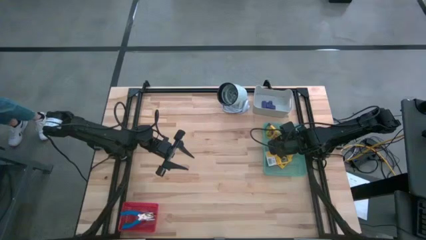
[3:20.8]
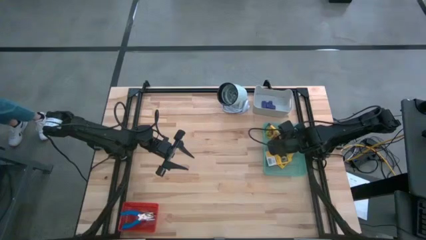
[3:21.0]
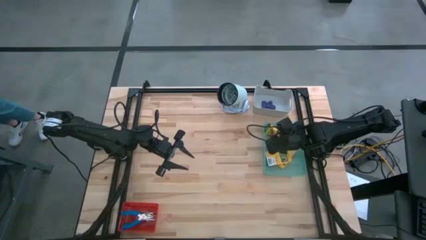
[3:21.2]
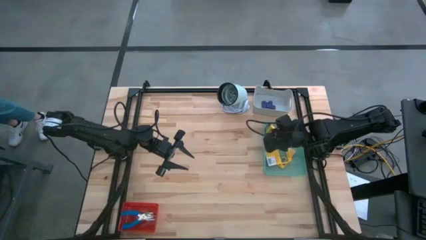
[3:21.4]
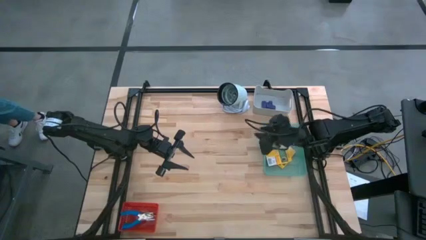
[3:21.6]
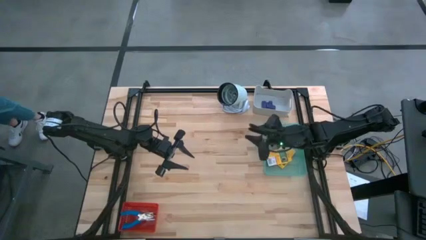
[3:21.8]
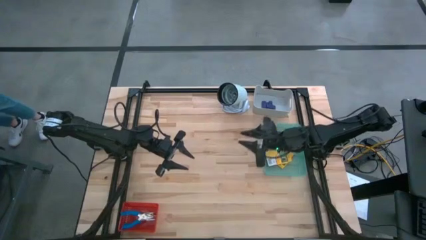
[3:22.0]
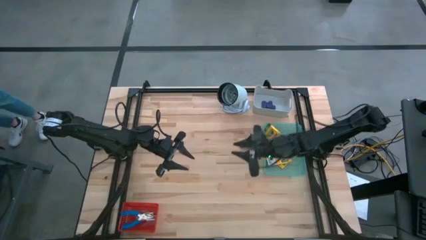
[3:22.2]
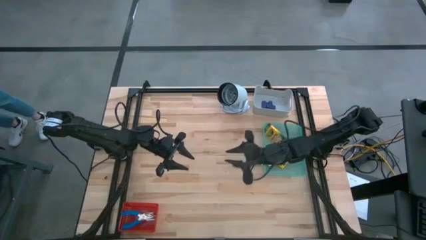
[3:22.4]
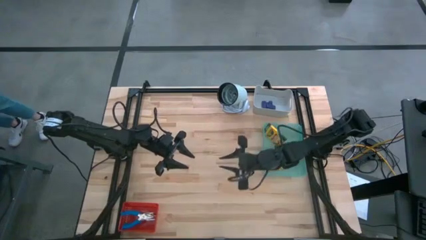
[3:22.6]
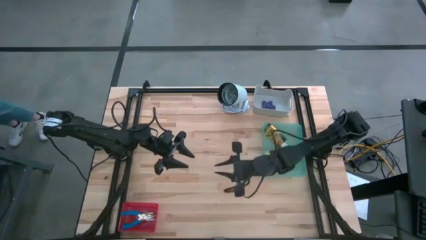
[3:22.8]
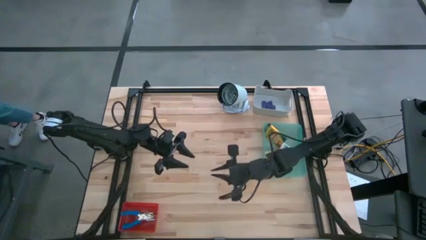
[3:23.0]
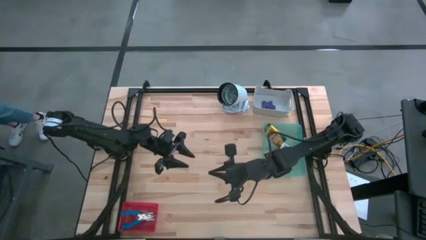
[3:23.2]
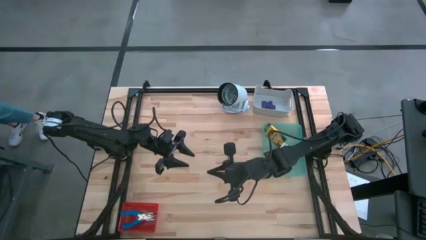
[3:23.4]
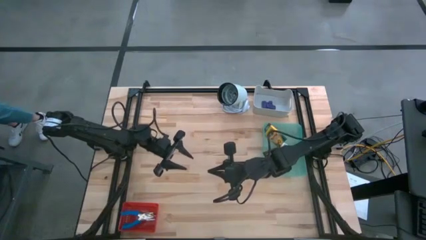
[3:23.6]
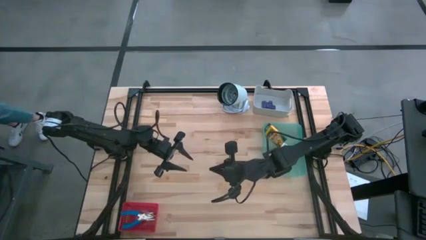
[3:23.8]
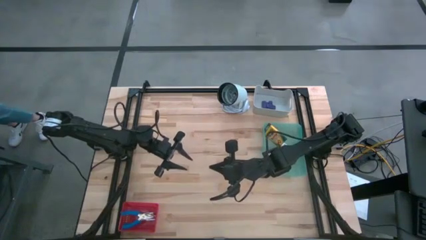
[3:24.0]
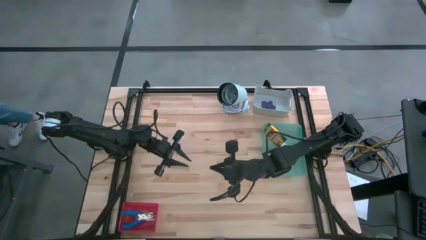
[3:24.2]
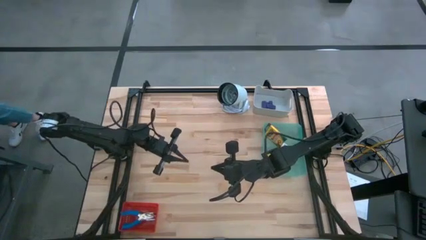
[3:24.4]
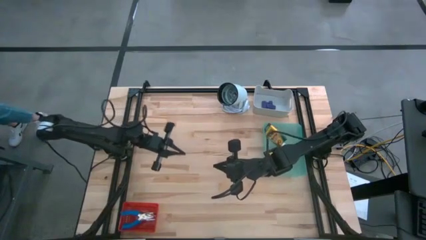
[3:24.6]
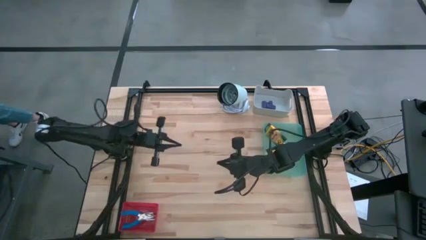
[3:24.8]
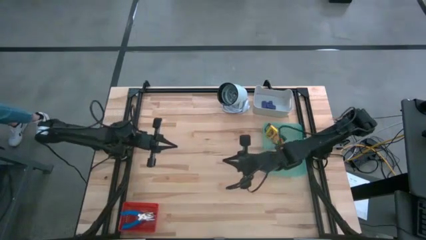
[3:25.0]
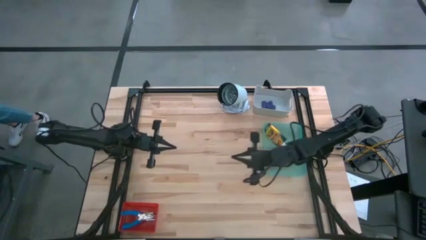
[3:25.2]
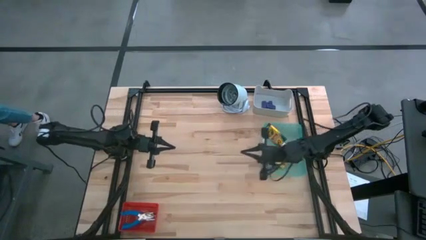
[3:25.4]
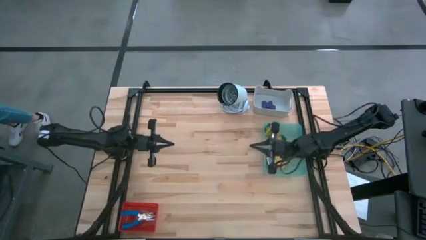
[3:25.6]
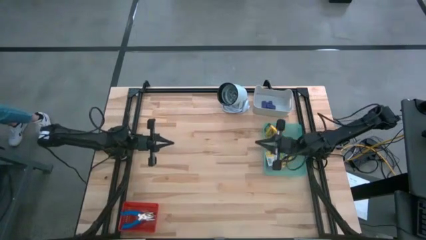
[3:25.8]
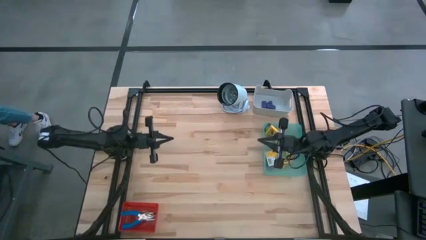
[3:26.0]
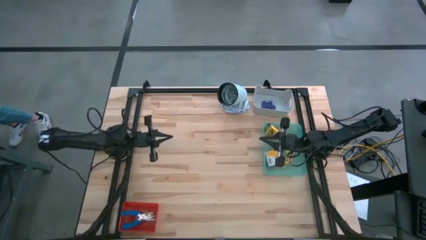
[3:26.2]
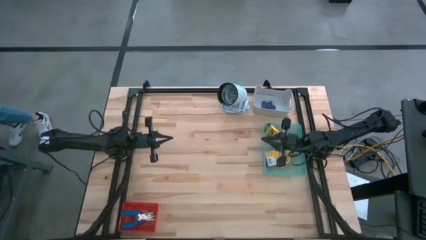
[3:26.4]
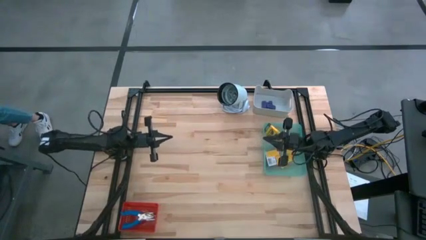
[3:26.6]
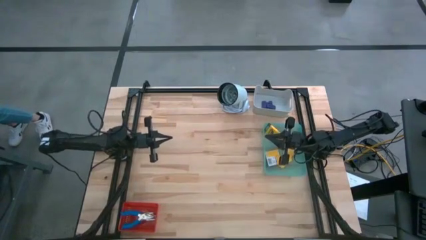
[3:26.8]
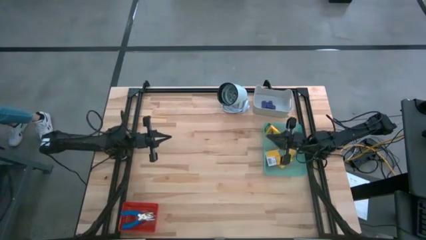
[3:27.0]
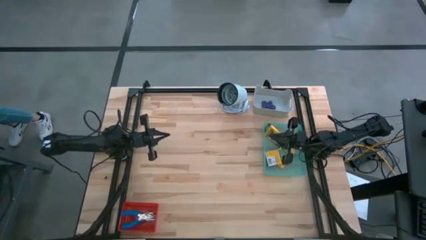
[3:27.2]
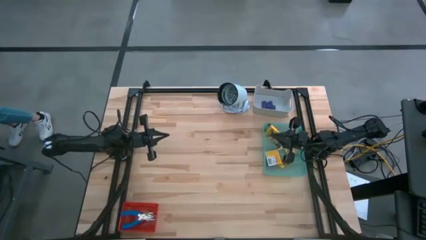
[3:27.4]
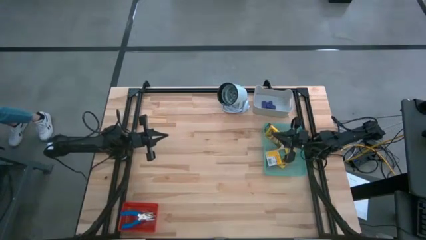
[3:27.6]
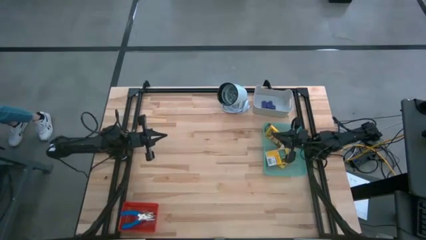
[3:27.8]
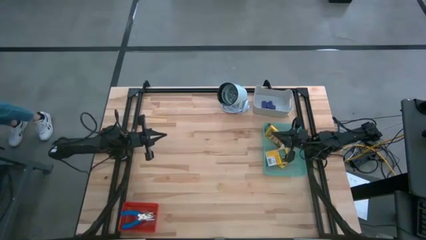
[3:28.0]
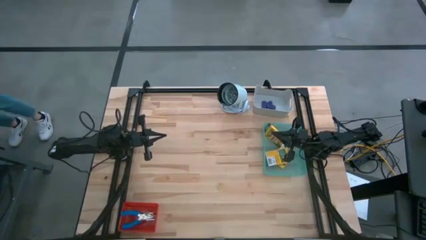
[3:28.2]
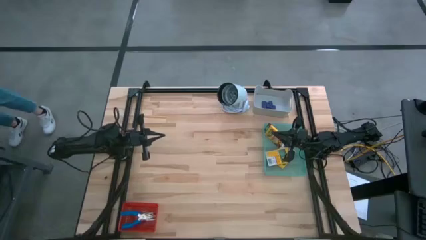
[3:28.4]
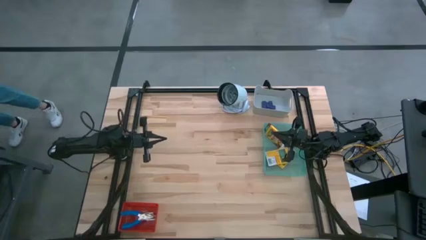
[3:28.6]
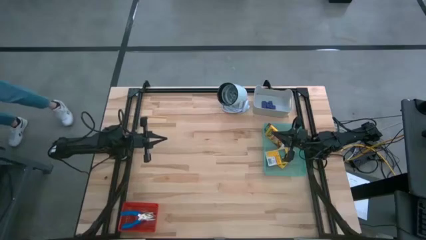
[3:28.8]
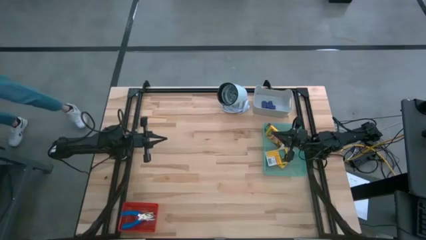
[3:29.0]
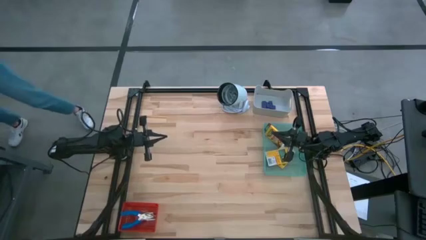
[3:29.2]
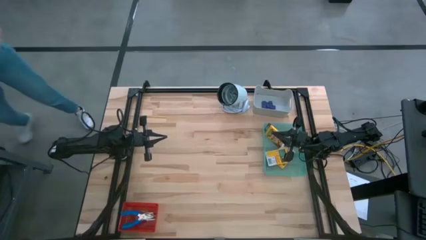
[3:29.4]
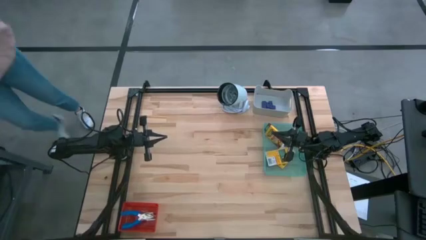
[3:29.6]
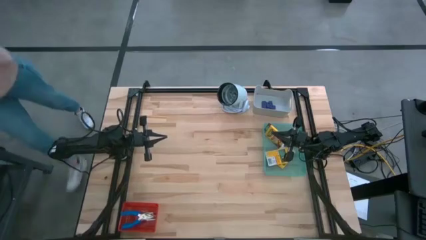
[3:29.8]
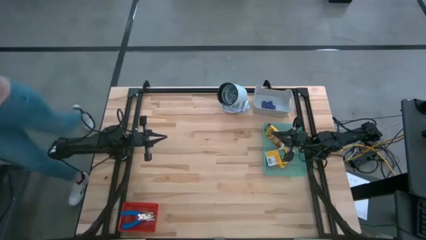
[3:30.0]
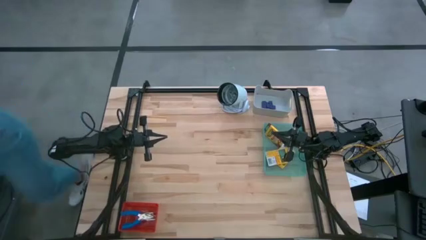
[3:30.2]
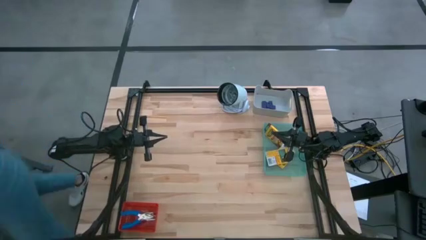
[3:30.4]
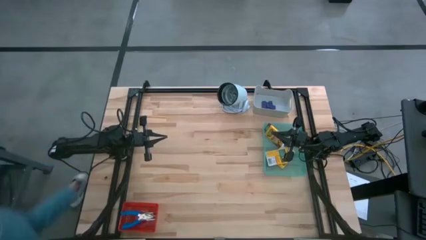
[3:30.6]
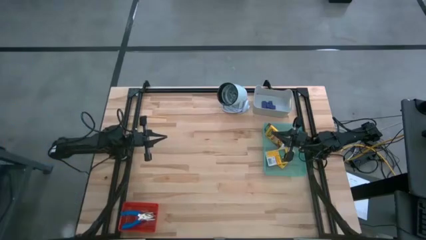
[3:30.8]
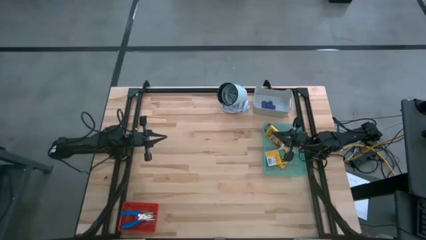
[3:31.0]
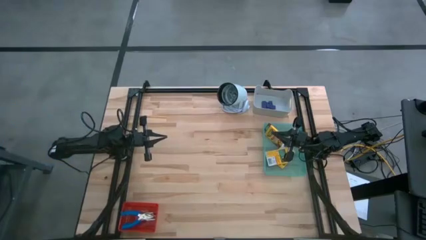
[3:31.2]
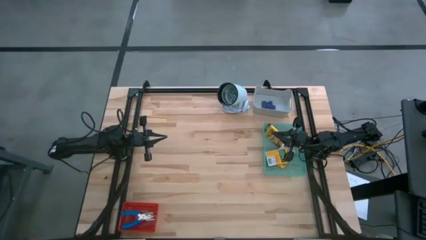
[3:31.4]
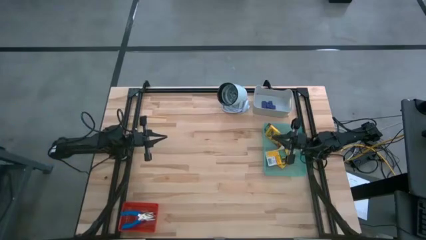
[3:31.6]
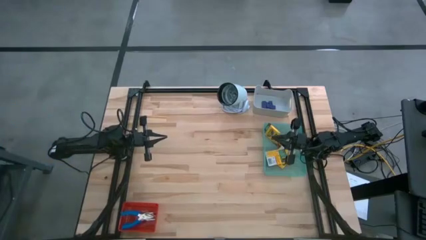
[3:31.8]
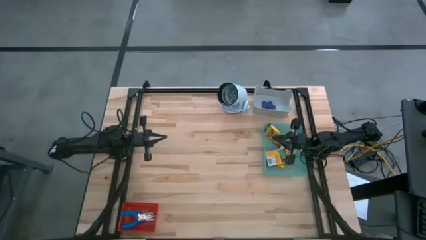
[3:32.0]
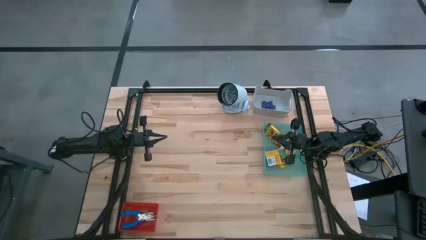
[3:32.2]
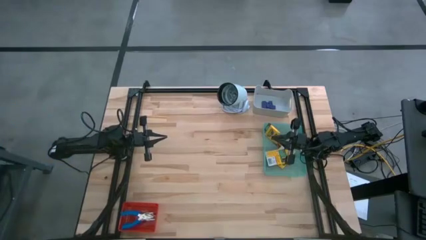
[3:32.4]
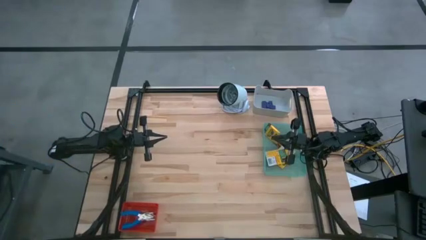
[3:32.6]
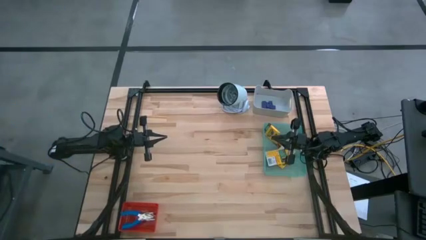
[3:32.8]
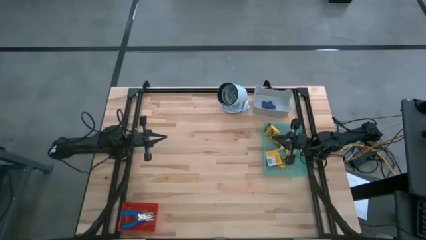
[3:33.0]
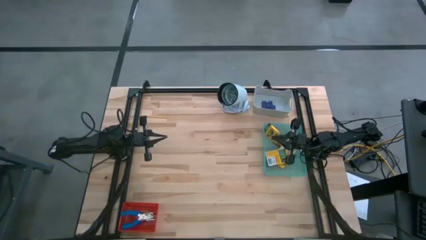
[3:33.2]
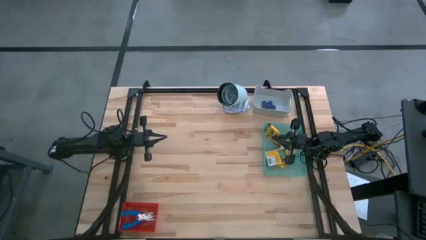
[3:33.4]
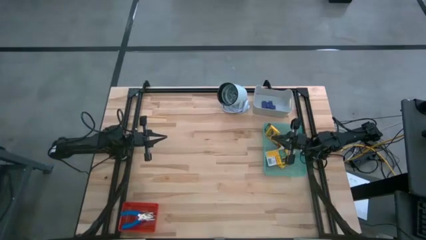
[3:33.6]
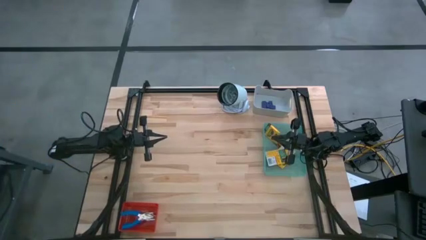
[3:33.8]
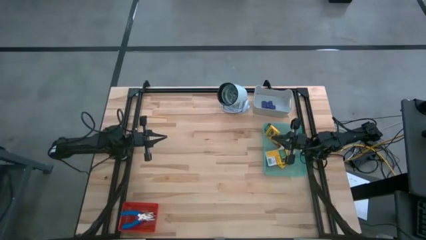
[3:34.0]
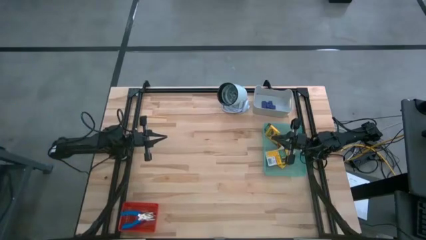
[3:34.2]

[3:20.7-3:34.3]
Task: Pick & Place School Supplies
Return to Home Position
